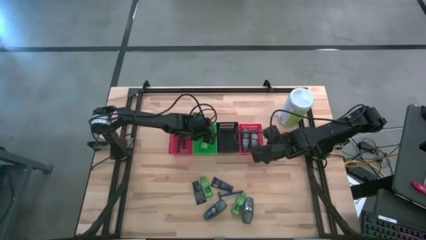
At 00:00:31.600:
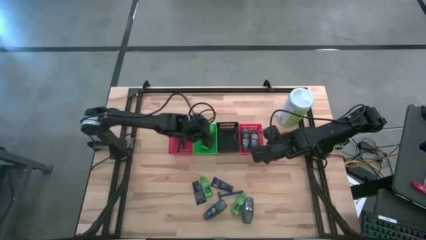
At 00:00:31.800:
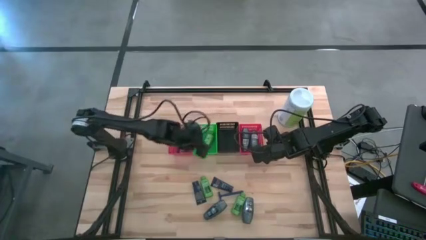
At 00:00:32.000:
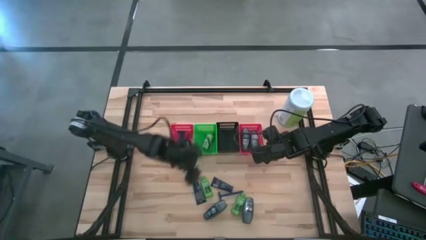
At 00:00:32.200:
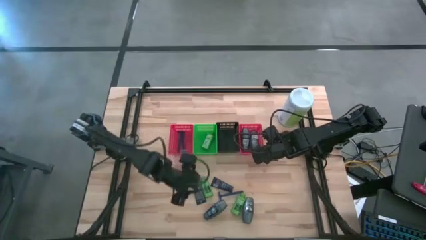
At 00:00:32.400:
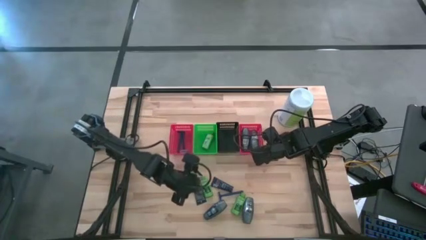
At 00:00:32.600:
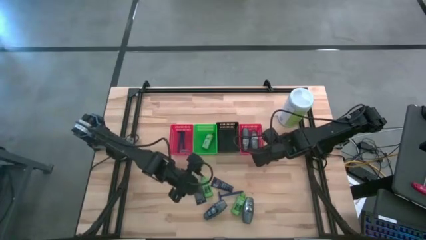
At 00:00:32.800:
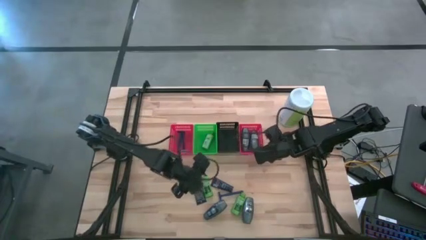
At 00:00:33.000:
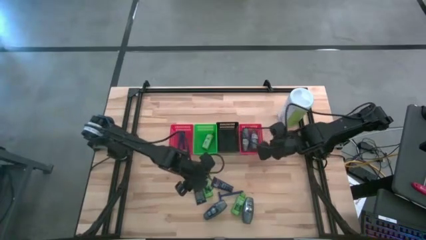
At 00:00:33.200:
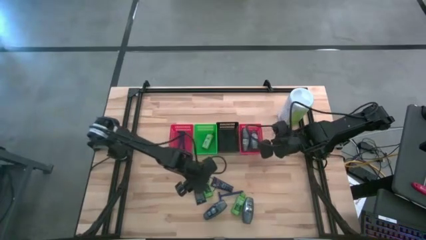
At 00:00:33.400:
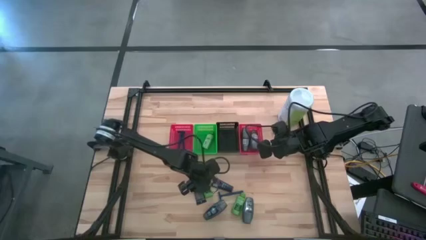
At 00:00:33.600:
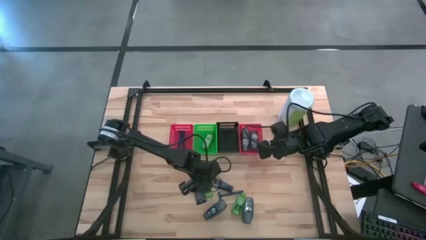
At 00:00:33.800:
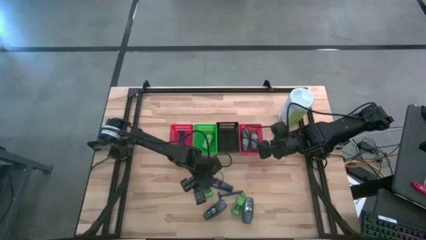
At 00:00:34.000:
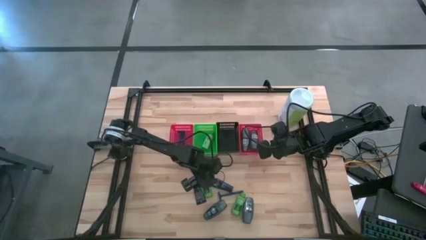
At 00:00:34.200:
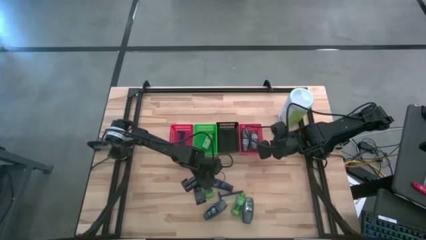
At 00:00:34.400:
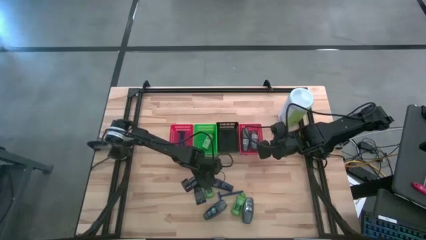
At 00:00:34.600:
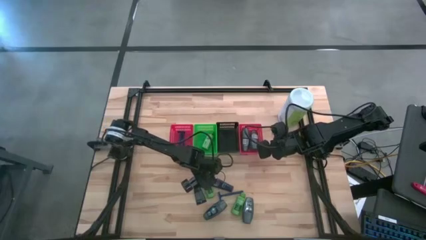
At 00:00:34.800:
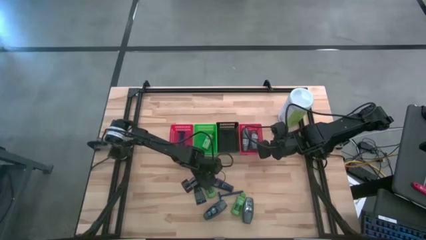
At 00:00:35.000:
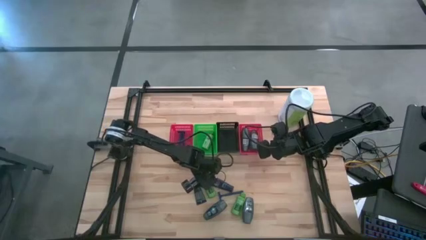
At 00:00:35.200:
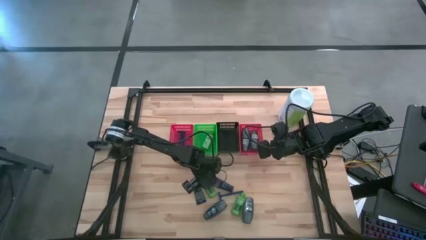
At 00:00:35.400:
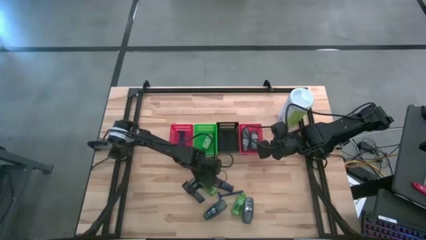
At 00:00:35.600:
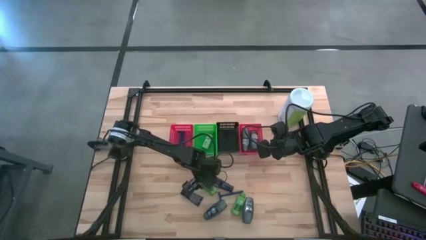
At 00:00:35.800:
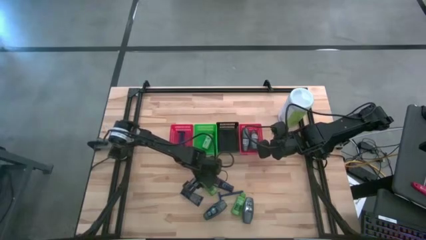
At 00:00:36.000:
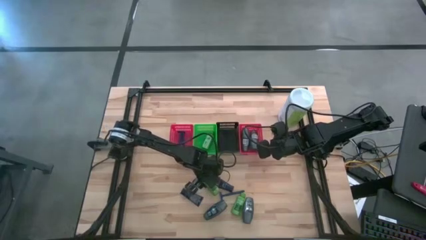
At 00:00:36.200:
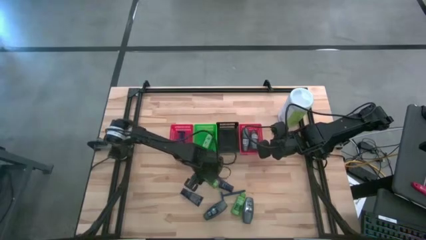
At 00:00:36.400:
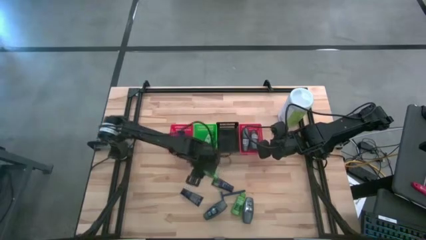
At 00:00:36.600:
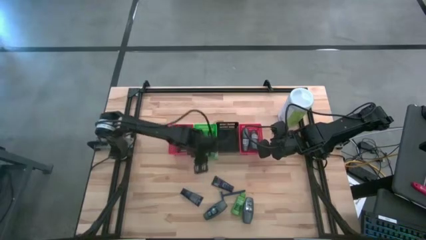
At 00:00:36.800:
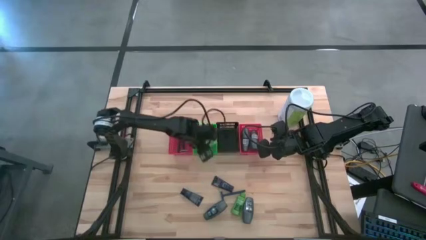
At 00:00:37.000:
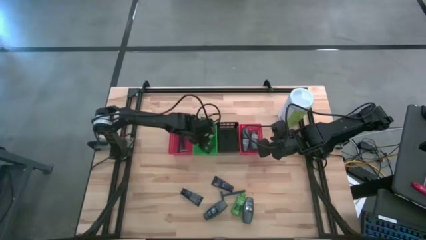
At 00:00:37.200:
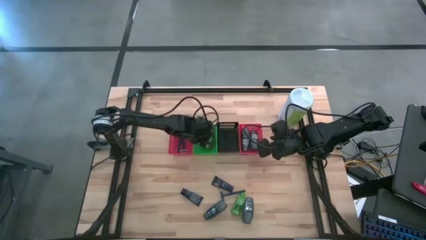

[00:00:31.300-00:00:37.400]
Task: Pick & Place Travel size toiletries
Put the top green shampoo into the green bin

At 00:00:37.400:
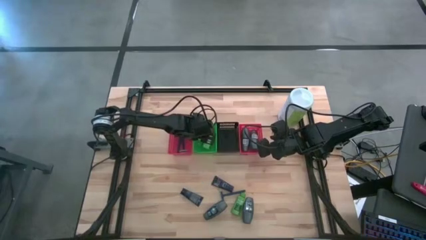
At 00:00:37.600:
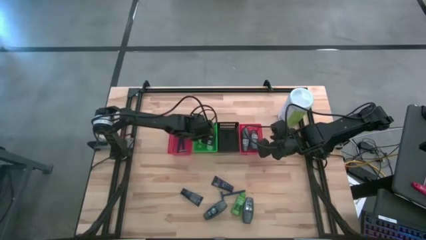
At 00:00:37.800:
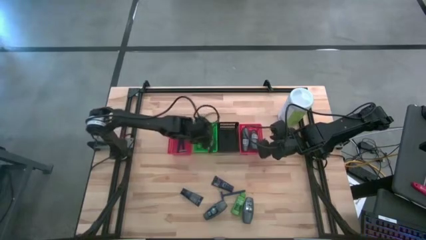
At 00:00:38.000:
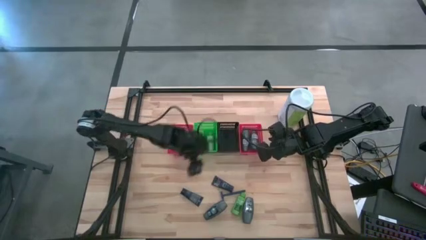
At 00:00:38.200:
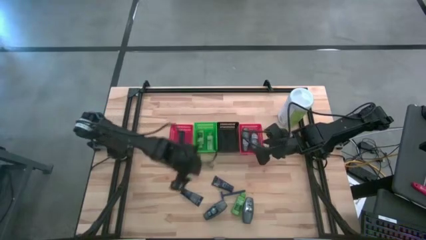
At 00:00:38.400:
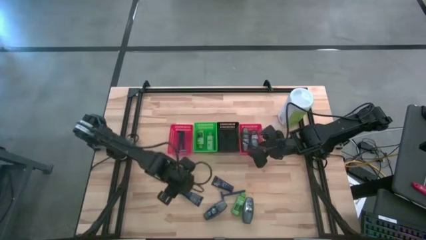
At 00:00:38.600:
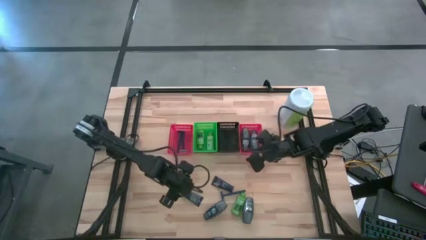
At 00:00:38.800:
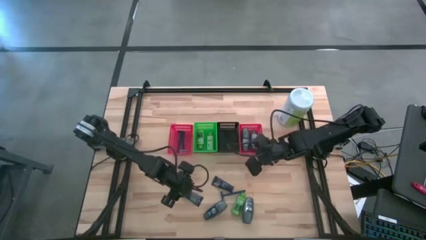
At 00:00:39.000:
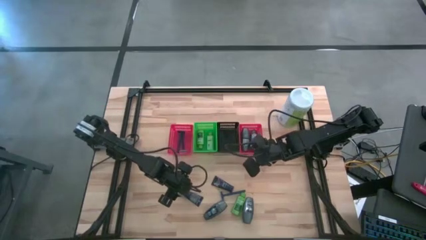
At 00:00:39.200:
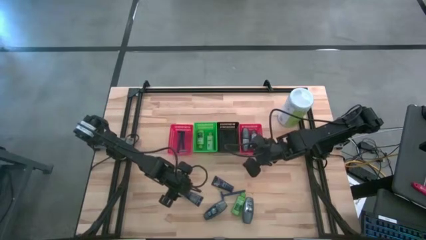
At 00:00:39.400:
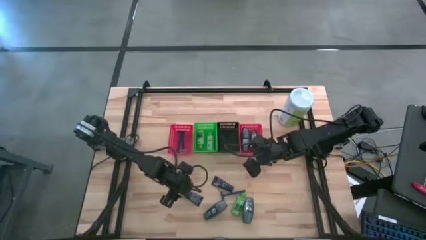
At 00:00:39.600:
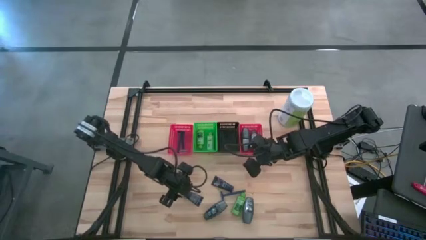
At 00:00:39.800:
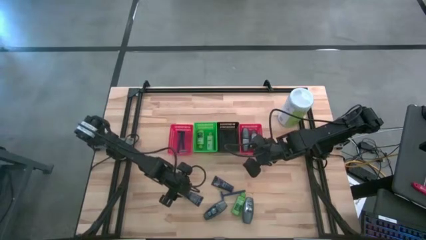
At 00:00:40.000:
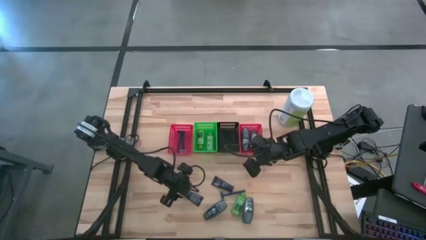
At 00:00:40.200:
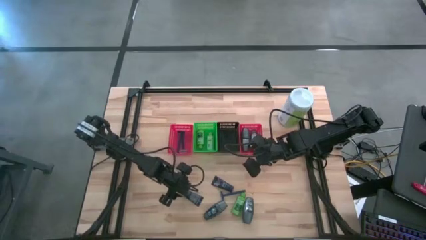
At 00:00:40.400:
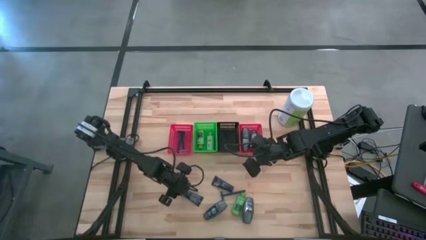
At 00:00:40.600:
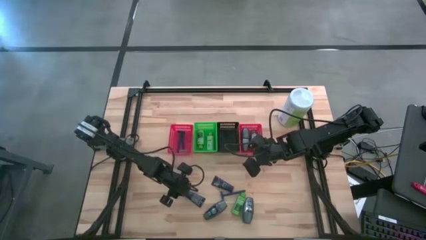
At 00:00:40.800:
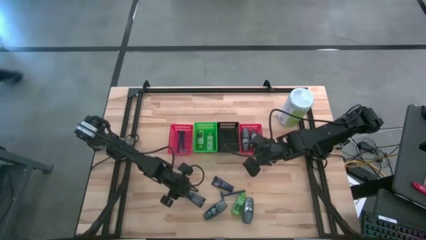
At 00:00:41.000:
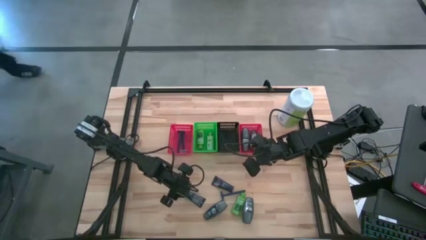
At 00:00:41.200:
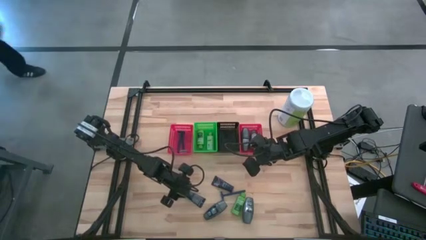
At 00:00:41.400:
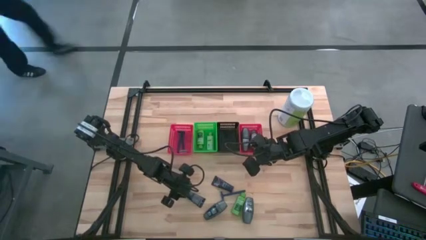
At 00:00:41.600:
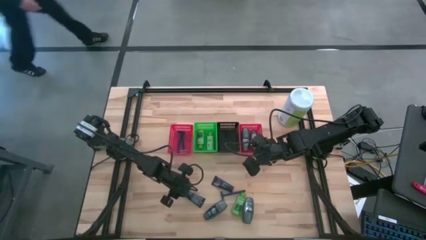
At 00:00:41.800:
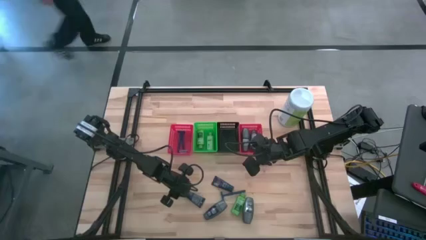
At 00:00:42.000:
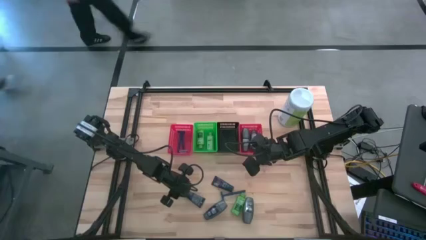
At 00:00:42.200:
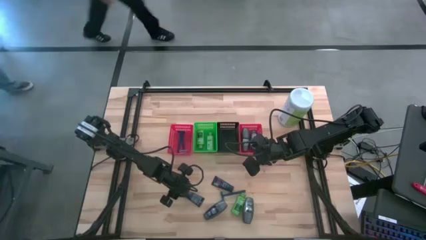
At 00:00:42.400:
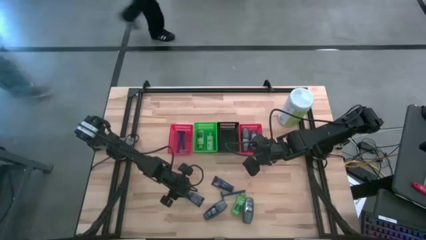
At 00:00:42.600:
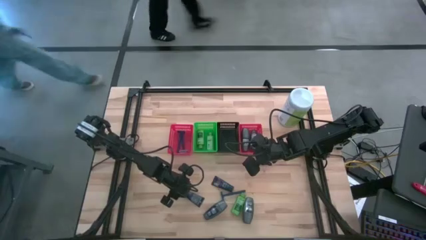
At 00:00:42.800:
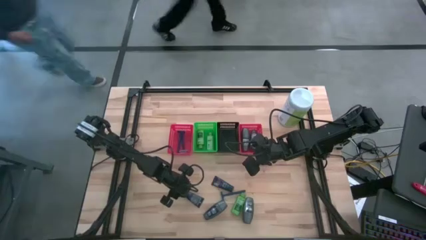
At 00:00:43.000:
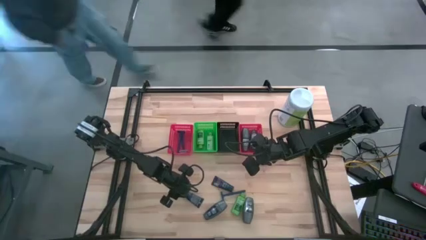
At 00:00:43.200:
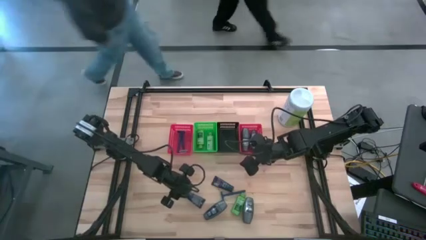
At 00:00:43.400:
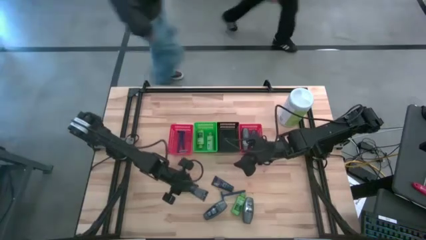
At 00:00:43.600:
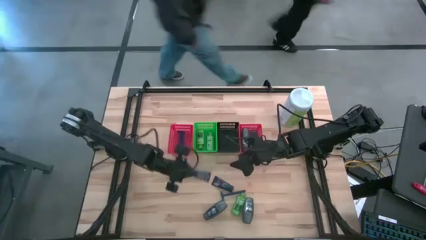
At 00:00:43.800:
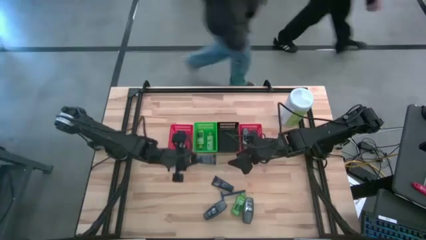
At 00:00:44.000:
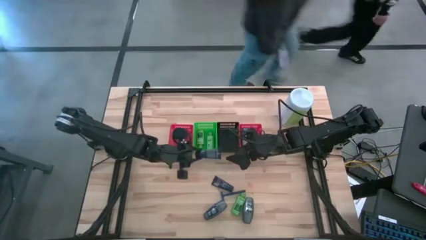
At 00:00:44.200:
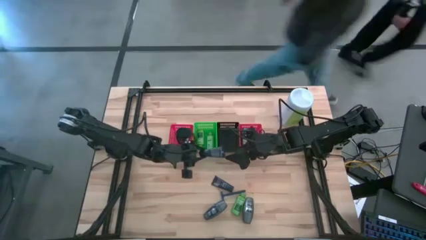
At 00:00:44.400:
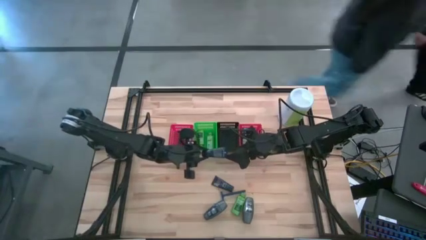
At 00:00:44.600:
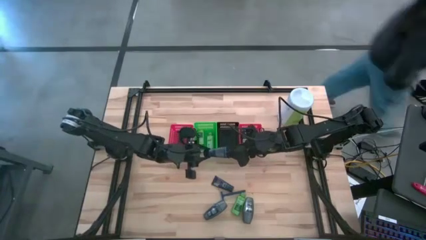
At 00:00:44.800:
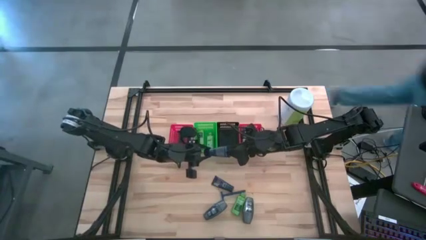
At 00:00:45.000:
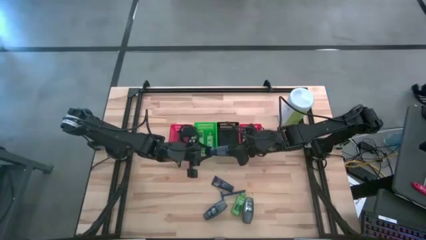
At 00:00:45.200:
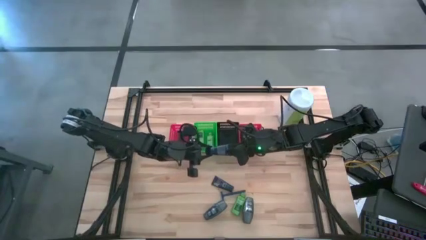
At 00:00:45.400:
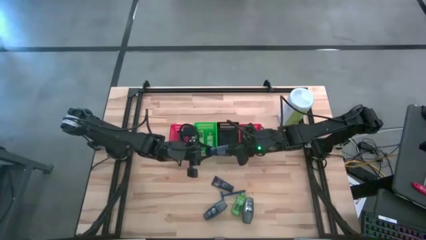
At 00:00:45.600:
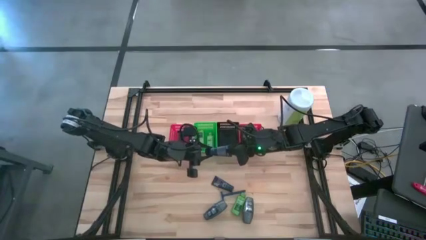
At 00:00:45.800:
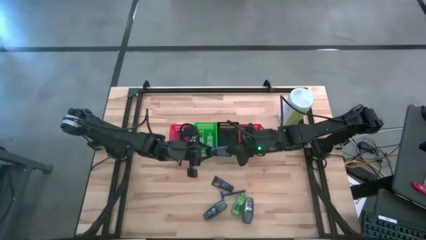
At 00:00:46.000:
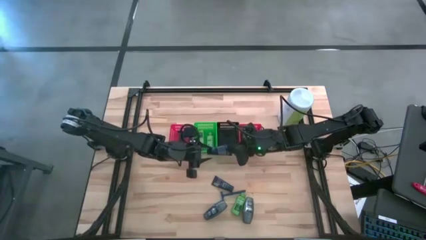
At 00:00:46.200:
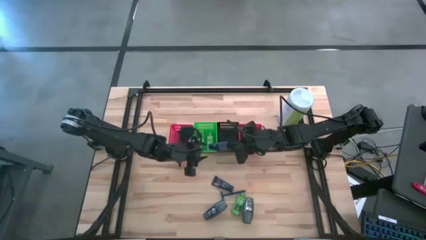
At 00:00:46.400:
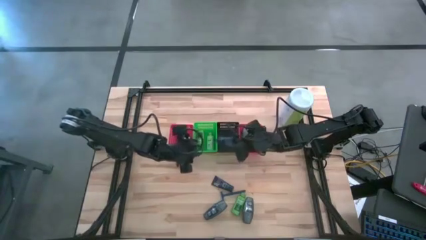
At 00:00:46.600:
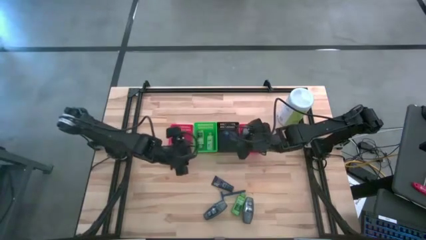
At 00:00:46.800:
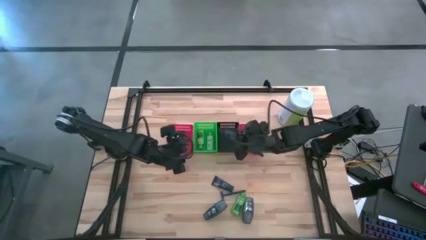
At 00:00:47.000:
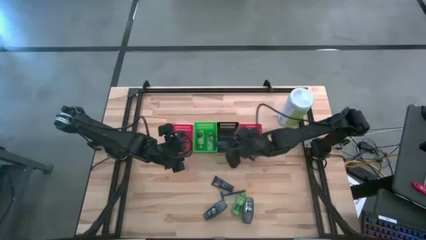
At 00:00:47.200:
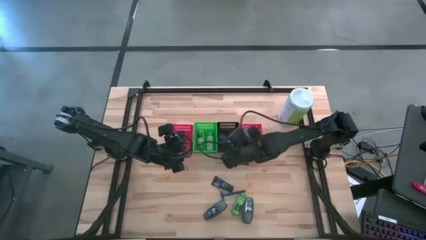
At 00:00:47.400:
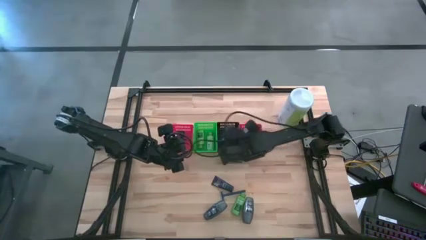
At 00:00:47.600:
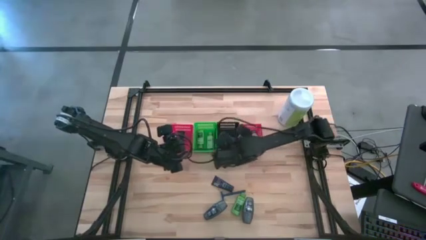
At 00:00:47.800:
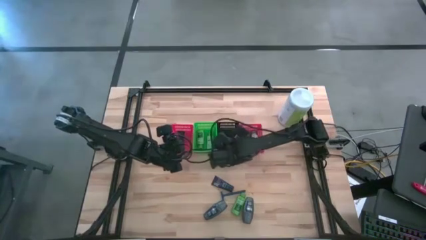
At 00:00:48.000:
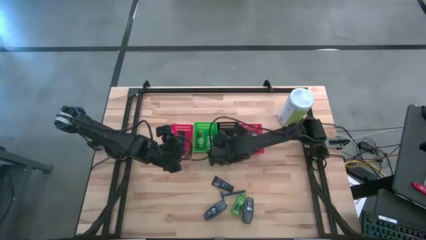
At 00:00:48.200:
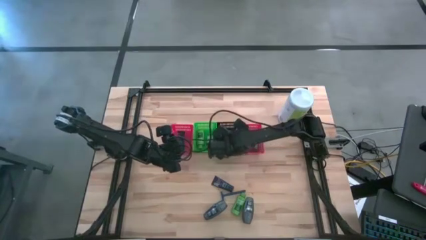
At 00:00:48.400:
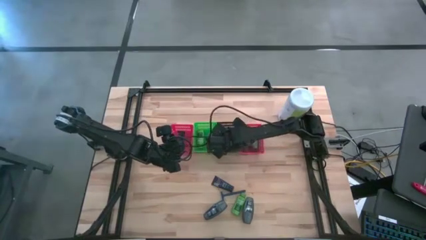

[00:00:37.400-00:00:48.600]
Put the bottom blue shaving cream into the black bin
